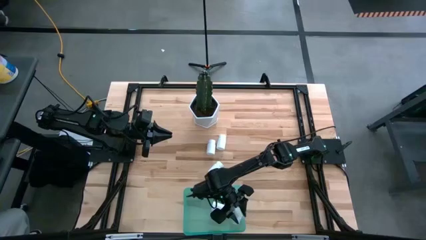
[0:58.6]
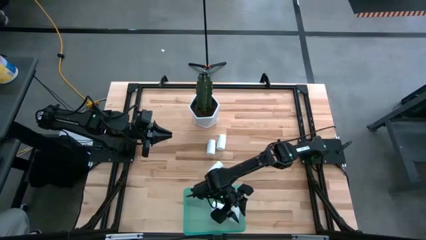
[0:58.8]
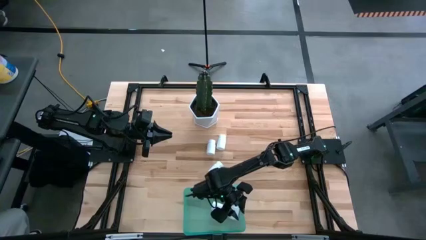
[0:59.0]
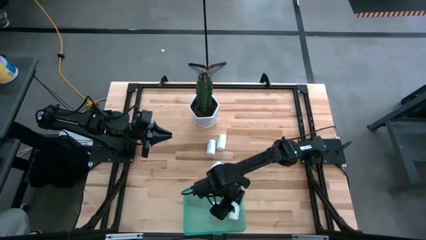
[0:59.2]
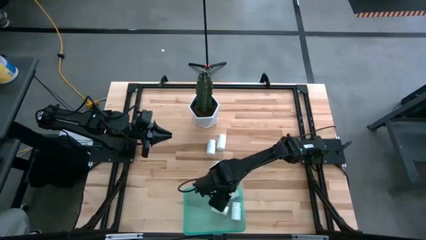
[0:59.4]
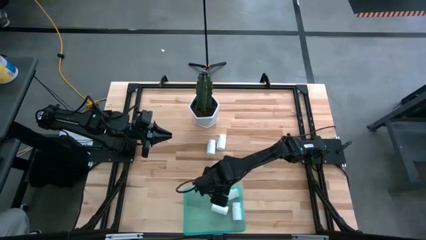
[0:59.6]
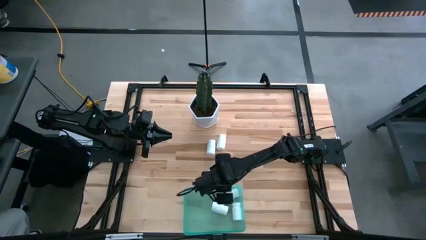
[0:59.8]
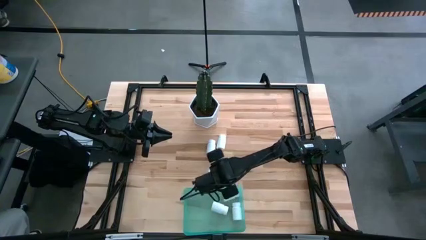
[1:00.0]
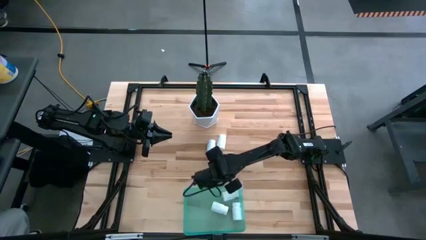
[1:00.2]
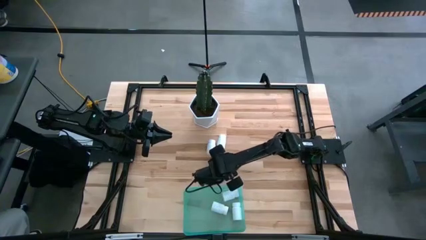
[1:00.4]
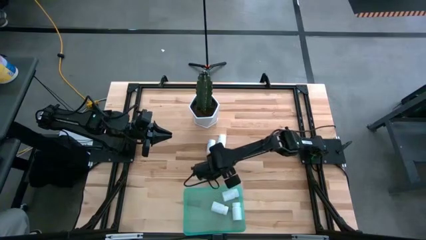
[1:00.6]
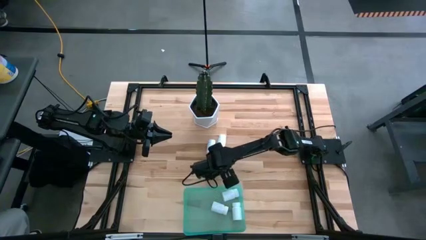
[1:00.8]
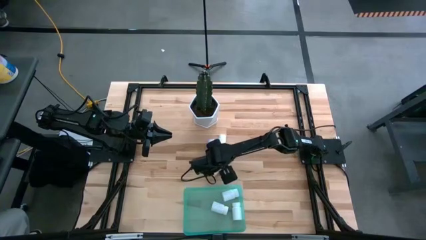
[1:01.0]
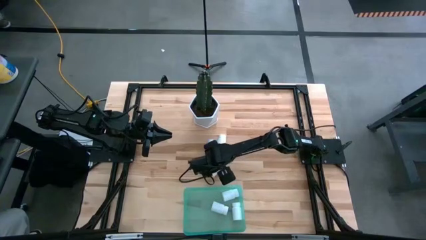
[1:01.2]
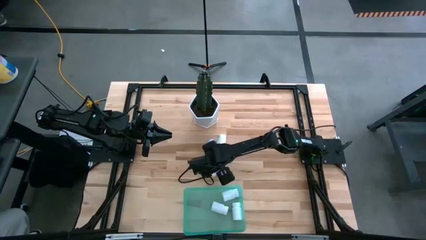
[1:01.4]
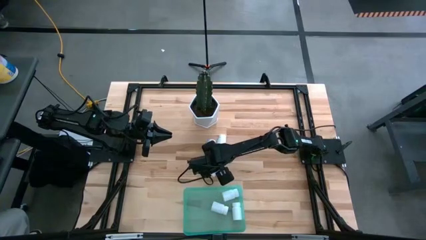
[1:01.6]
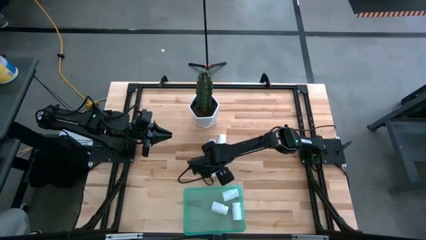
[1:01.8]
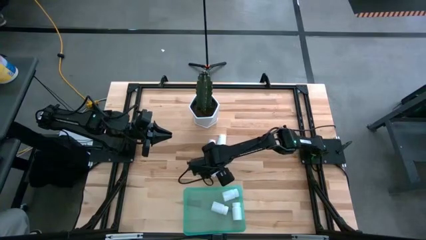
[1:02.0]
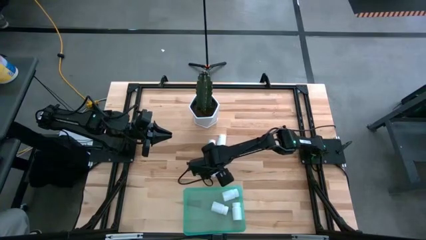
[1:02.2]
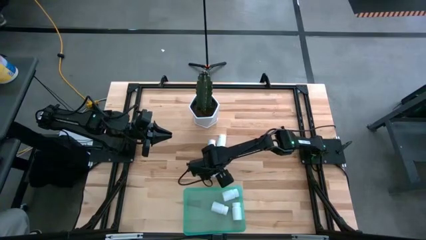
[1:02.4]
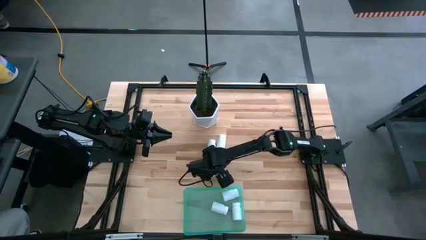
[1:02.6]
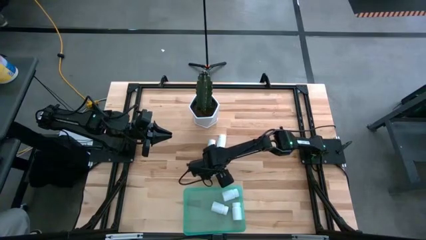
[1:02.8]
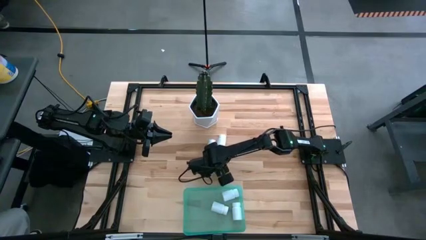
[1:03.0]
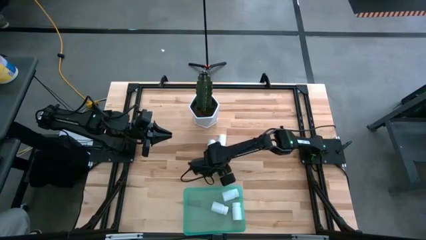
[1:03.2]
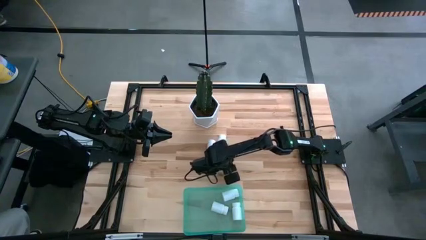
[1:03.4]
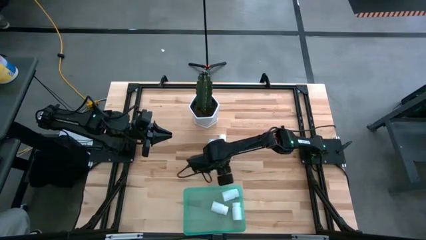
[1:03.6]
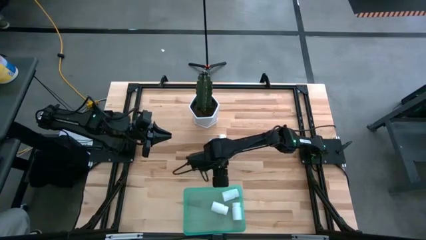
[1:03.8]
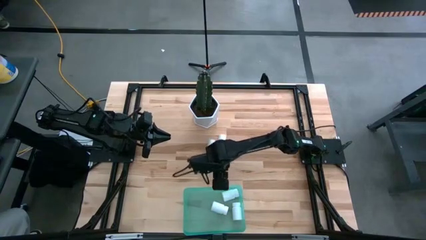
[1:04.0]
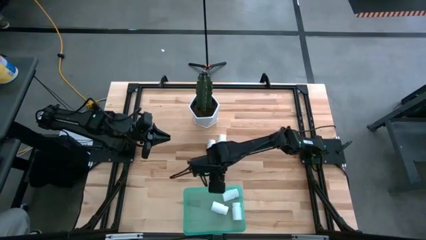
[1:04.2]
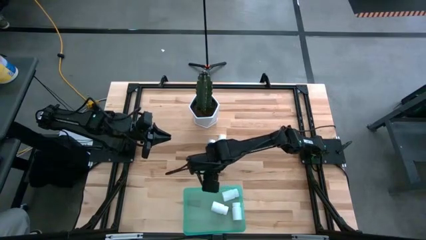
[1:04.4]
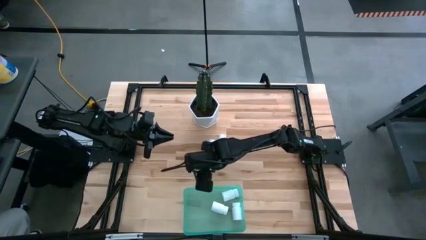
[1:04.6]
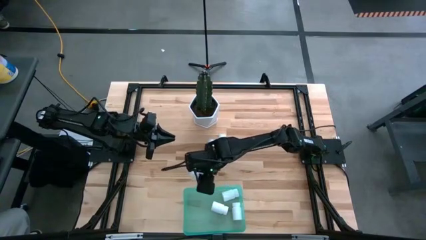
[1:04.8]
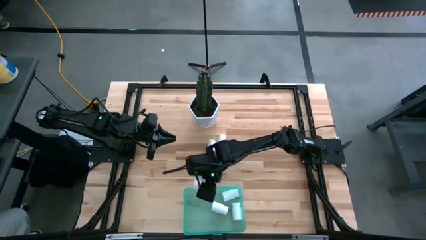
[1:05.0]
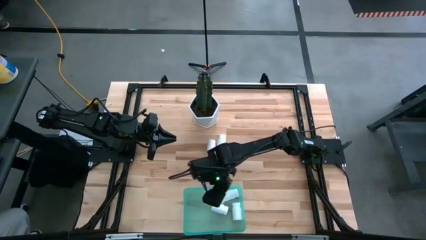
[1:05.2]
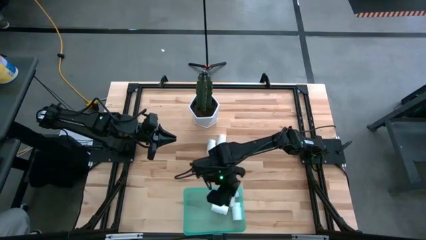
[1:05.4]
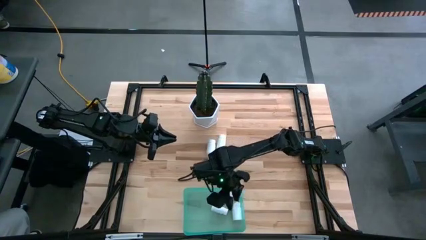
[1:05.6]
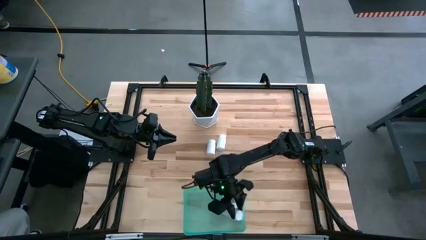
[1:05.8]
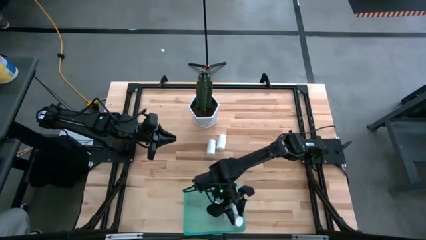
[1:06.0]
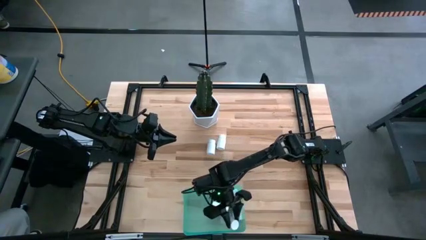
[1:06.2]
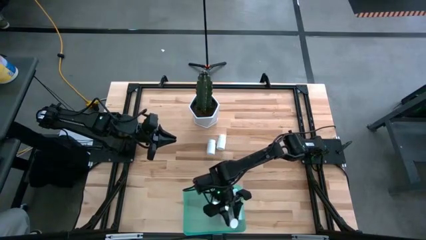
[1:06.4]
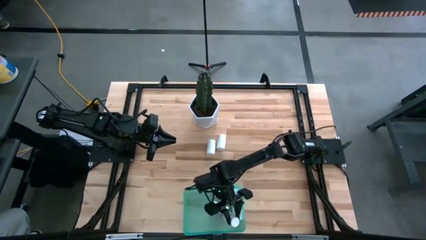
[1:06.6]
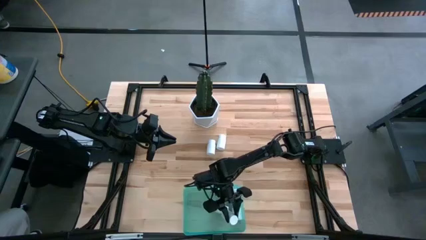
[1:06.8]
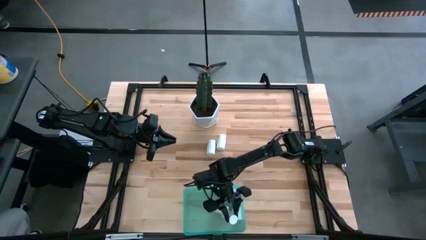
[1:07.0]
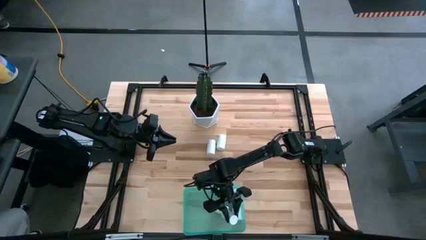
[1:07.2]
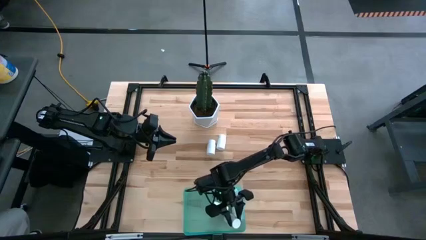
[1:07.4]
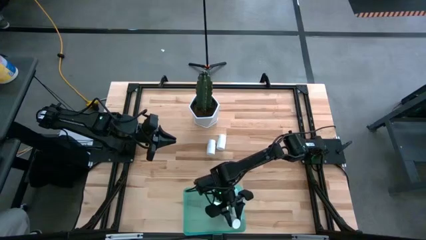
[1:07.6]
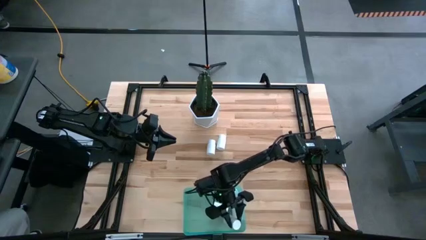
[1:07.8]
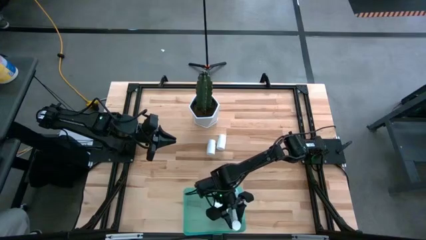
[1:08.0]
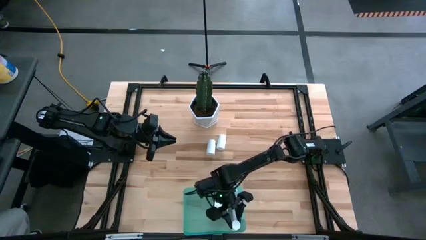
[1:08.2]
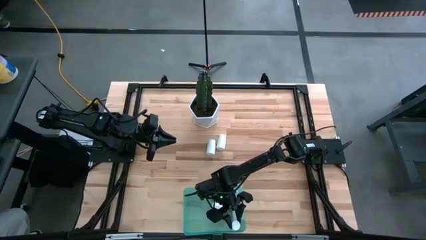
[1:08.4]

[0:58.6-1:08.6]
Task: Pick and place pill bottles into a basket
Put the white pill bottle into the bin

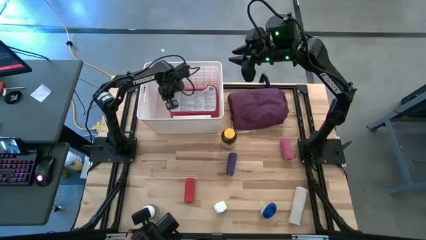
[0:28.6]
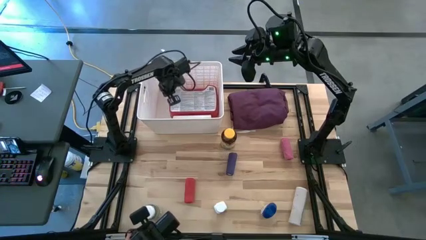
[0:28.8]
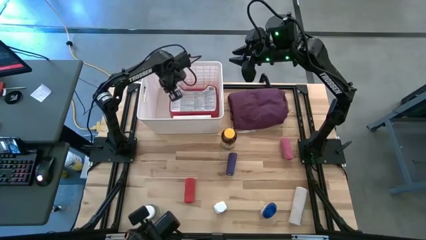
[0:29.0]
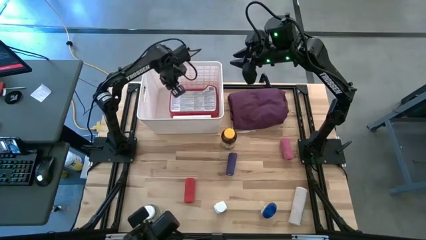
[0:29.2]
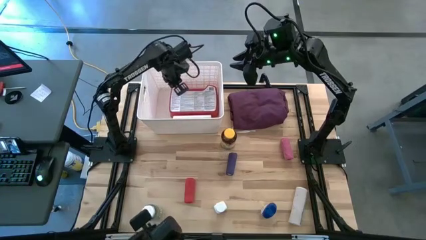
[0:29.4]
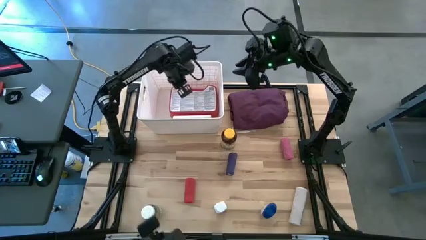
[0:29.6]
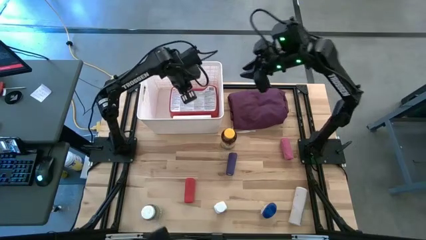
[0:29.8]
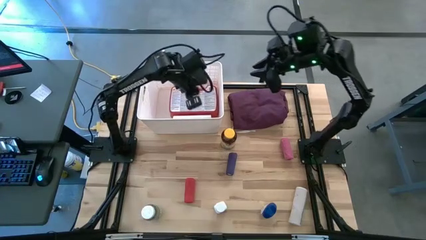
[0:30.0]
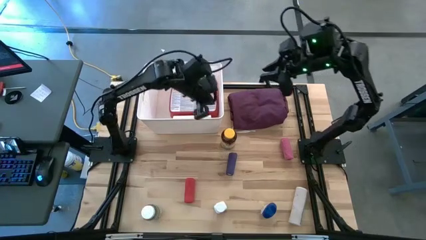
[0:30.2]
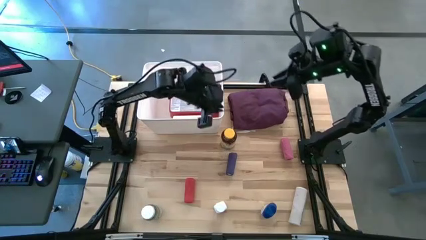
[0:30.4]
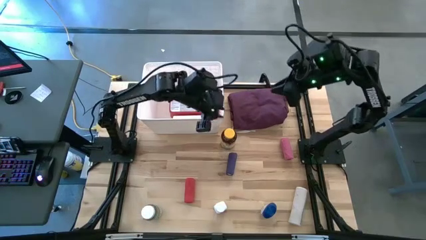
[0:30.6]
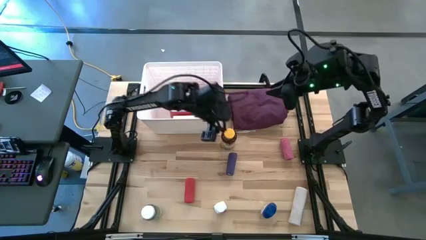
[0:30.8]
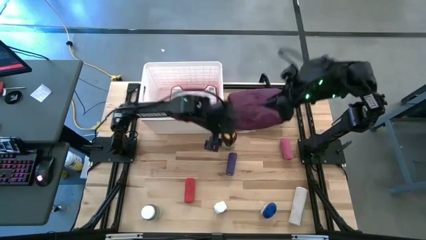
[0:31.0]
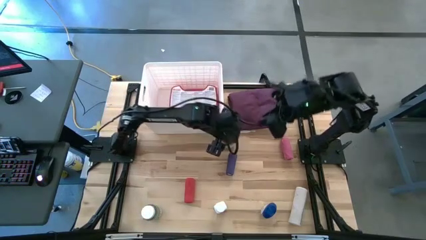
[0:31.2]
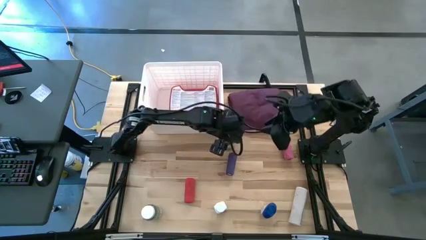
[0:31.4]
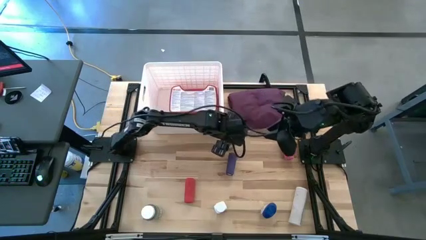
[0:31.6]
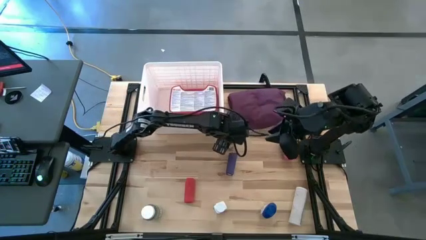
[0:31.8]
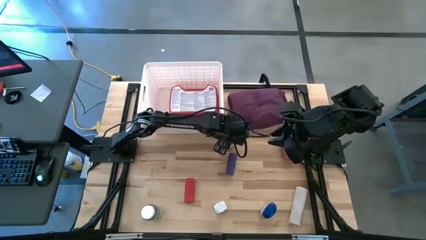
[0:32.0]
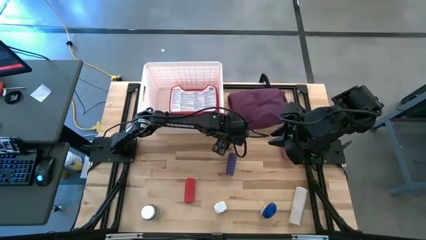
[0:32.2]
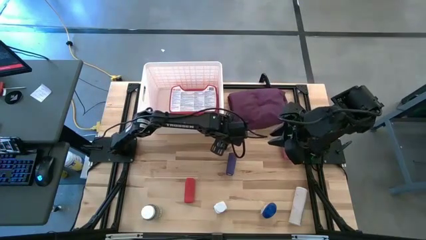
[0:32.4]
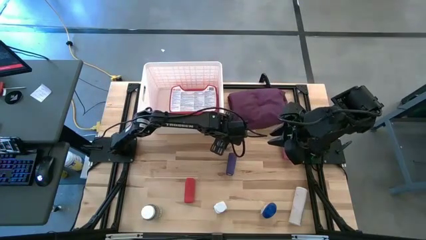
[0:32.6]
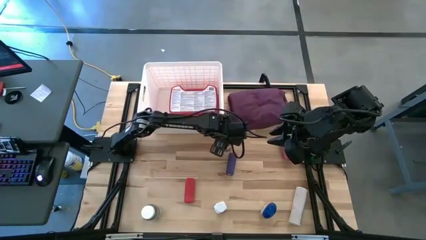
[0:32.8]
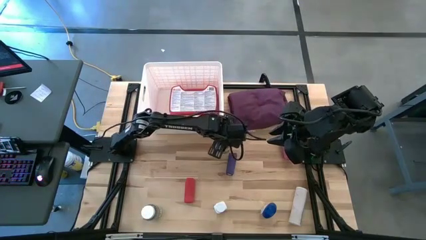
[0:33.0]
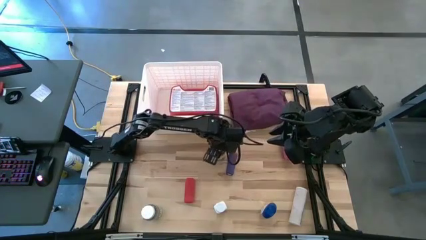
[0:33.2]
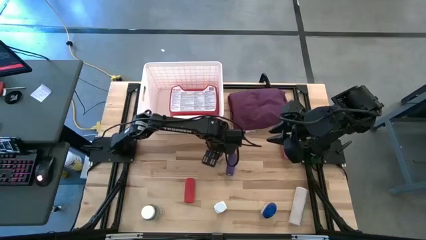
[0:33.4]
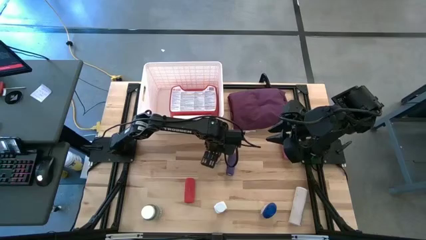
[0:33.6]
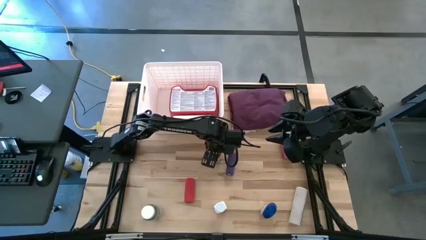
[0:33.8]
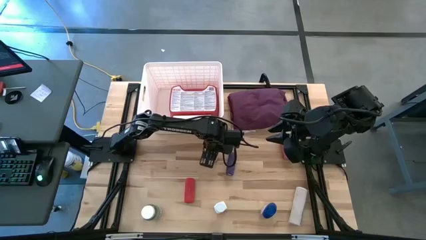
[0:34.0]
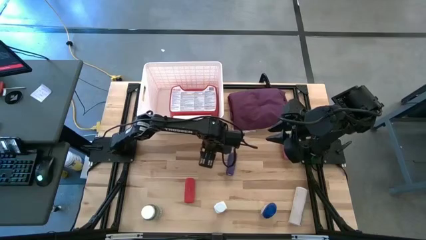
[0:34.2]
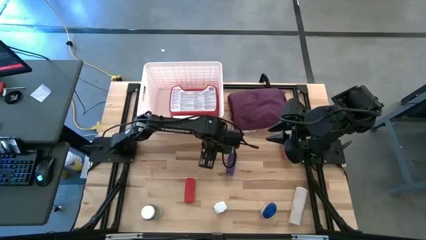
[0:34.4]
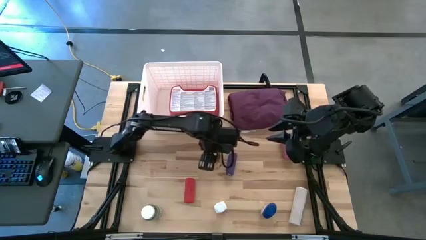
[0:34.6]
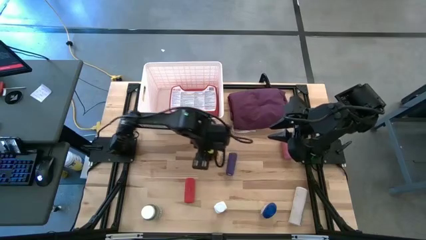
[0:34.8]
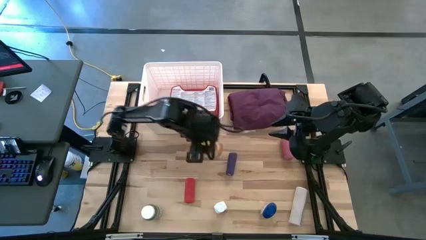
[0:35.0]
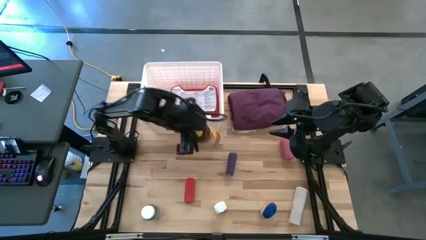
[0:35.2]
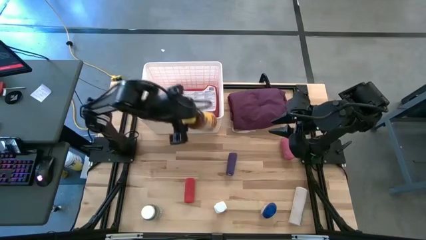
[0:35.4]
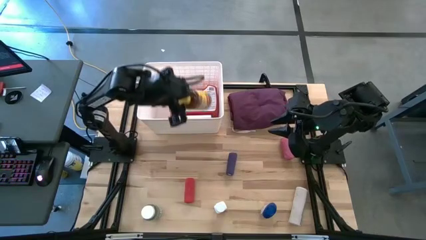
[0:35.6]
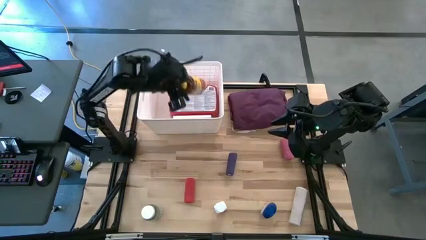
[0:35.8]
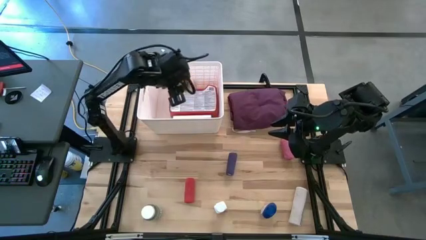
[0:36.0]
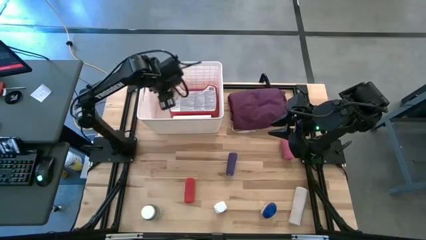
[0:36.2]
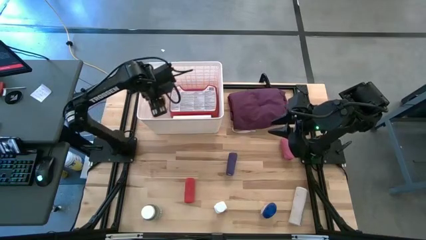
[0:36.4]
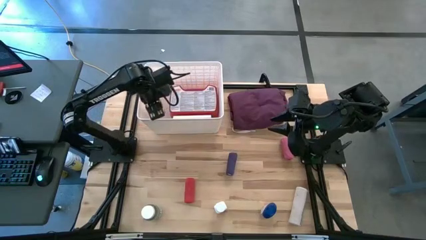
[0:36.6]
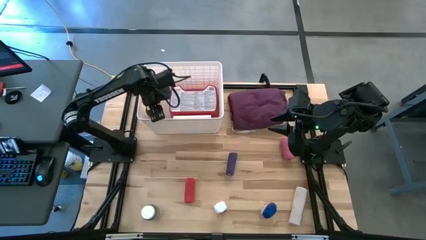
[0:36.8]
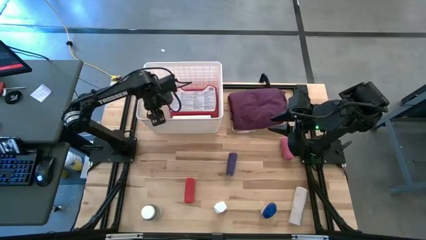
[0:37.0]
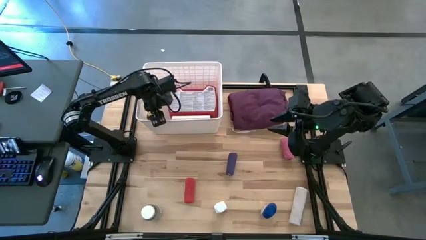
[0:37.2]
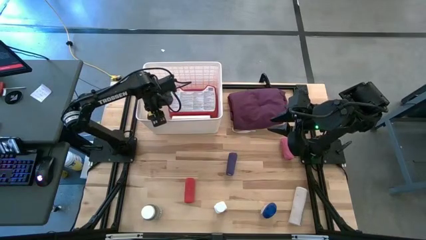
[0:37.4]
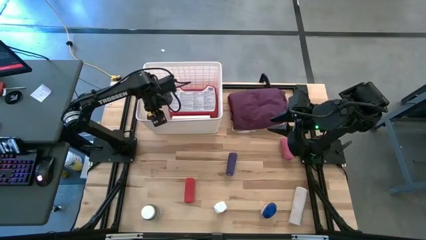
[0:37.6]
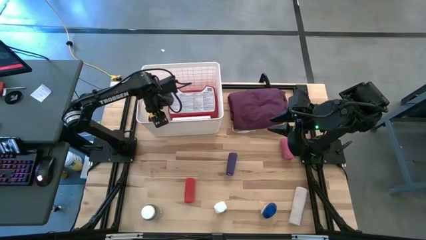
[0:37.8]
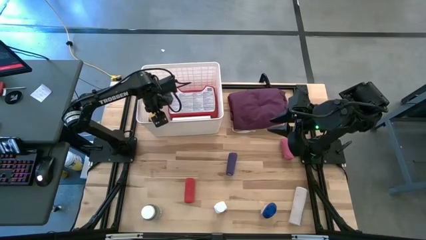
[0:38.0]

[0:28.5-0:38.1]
Task: Pick & place medical supplies in basket/bin
Put the yellow pill bottle into the white bin
